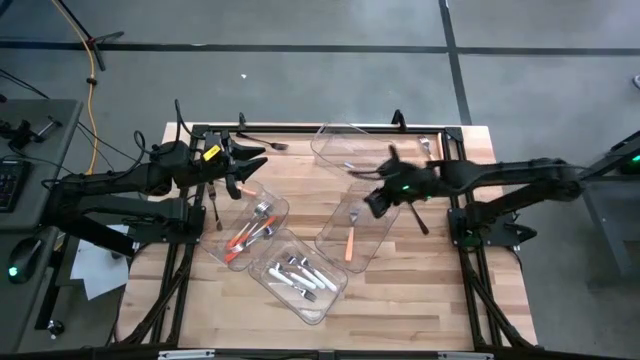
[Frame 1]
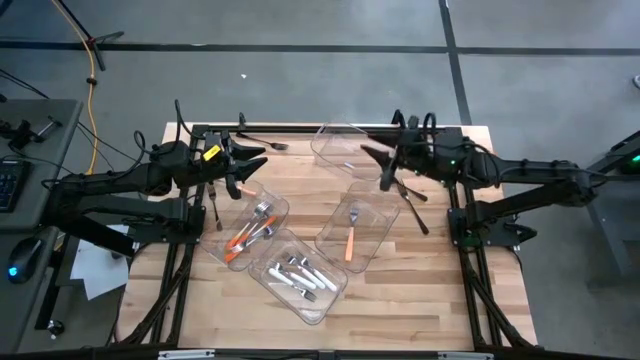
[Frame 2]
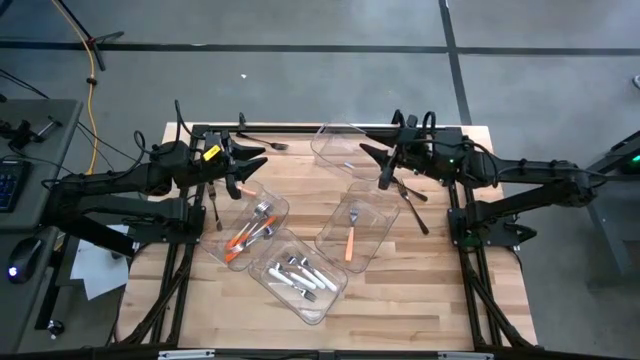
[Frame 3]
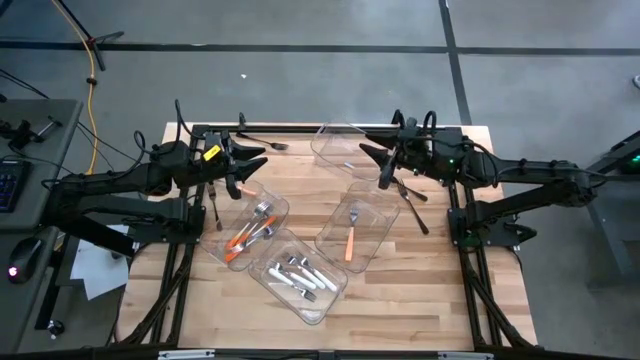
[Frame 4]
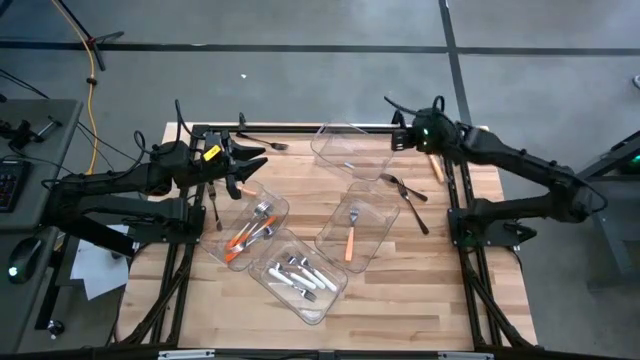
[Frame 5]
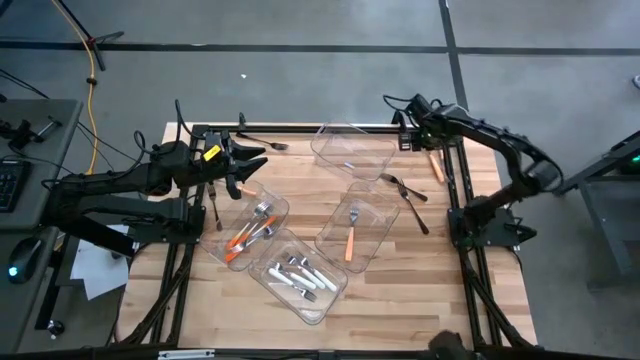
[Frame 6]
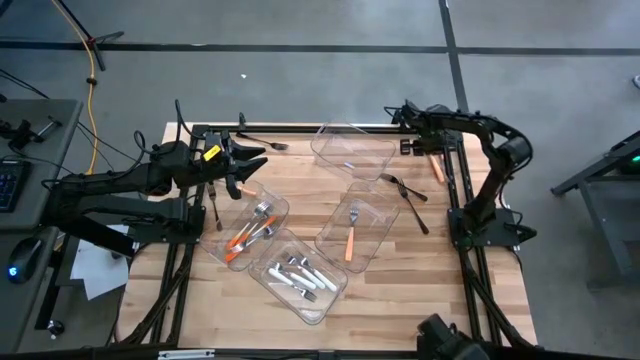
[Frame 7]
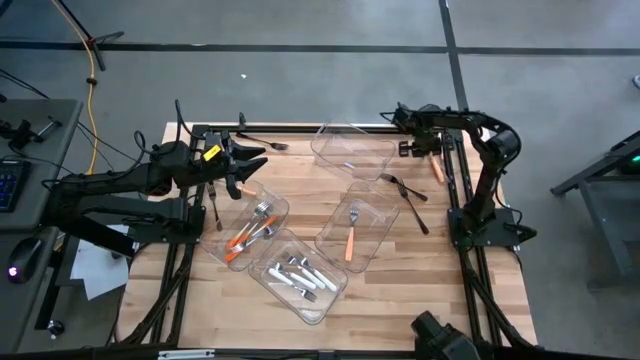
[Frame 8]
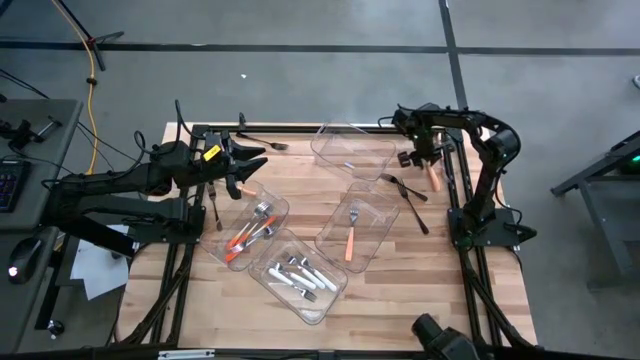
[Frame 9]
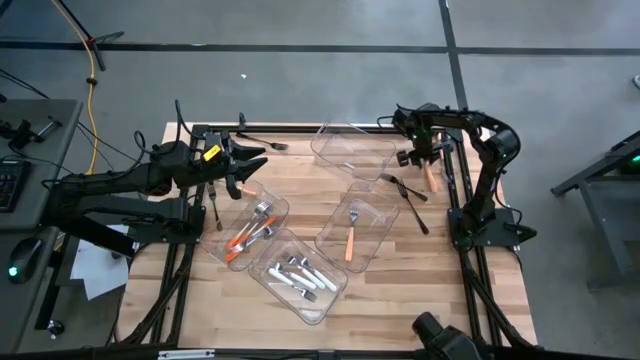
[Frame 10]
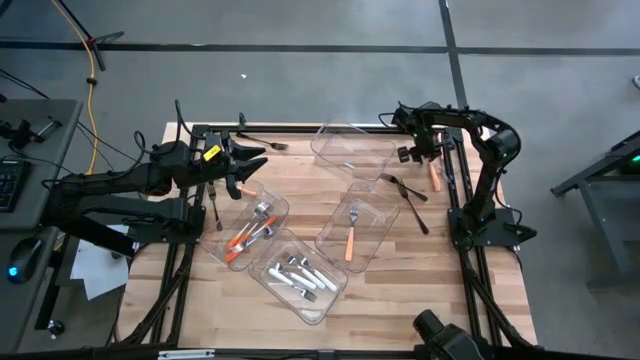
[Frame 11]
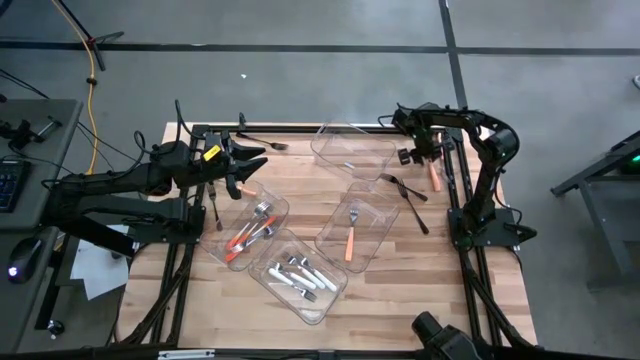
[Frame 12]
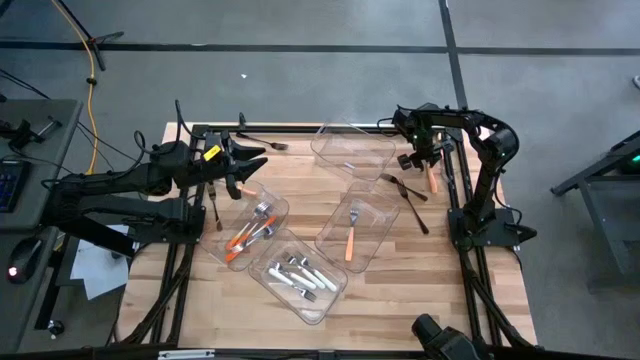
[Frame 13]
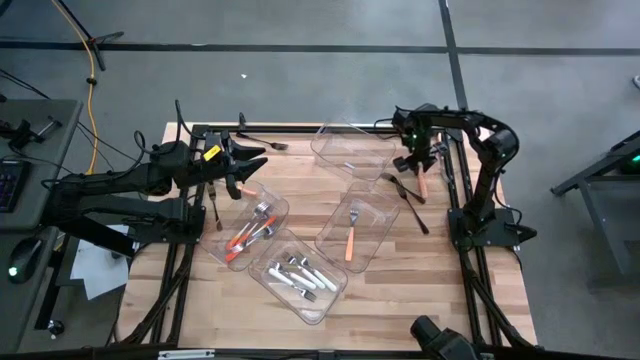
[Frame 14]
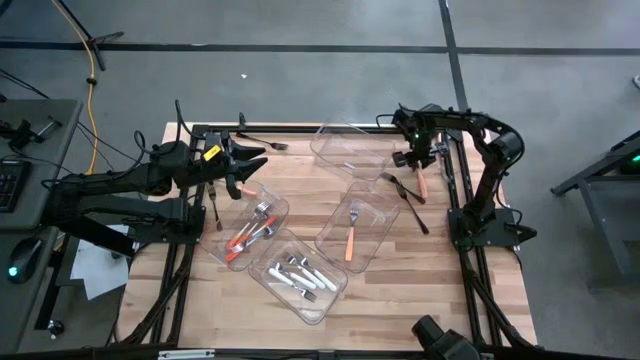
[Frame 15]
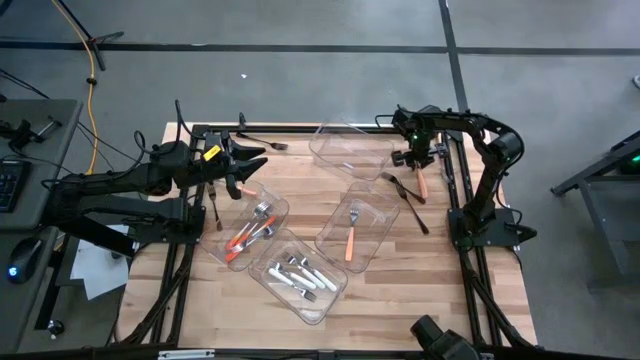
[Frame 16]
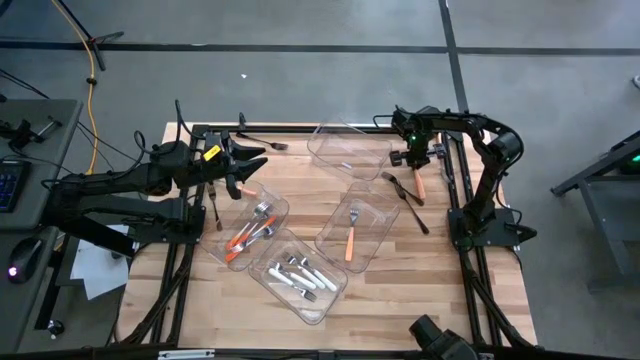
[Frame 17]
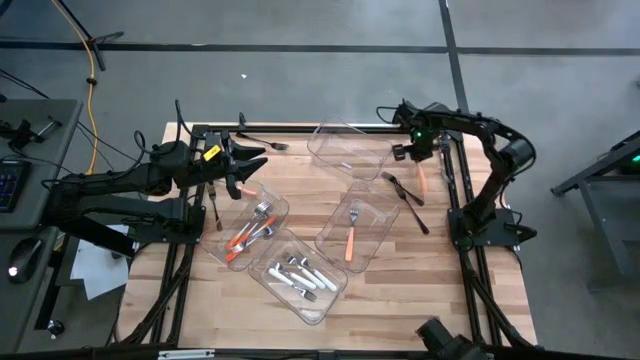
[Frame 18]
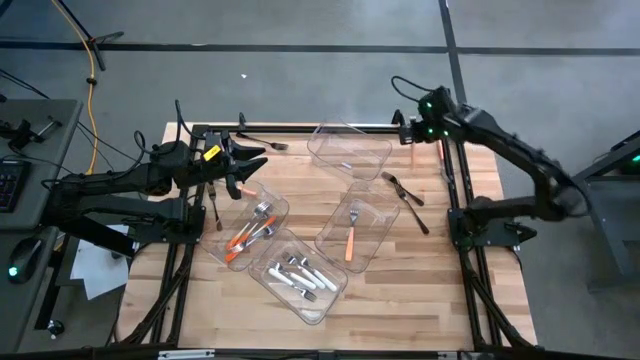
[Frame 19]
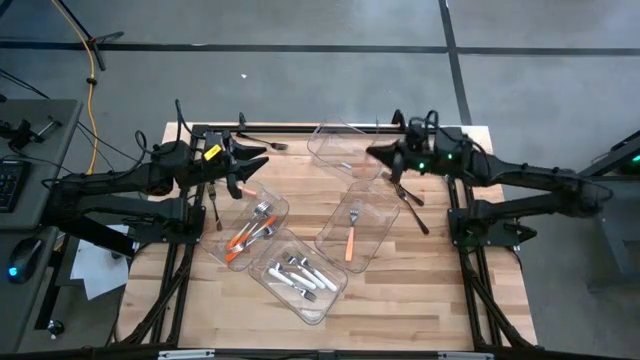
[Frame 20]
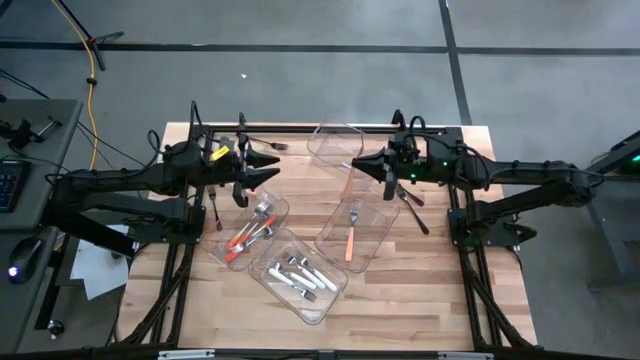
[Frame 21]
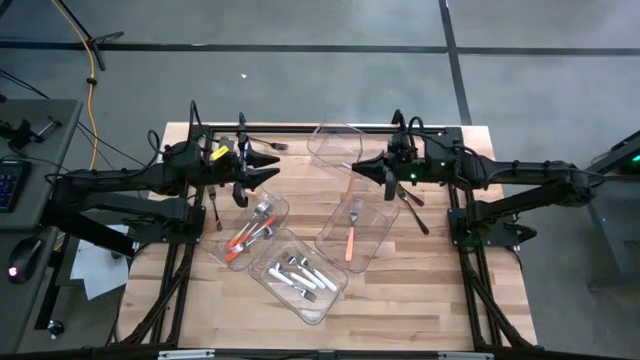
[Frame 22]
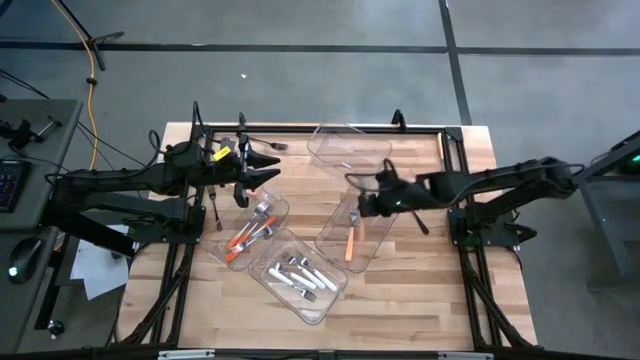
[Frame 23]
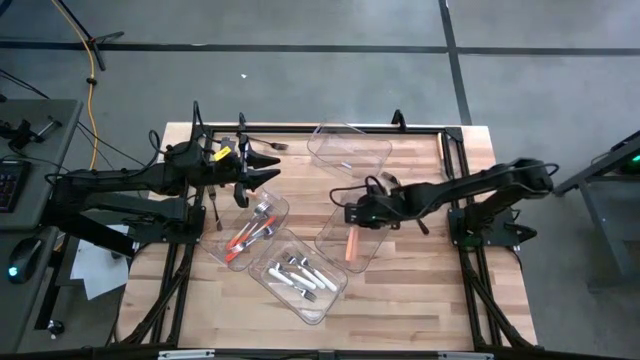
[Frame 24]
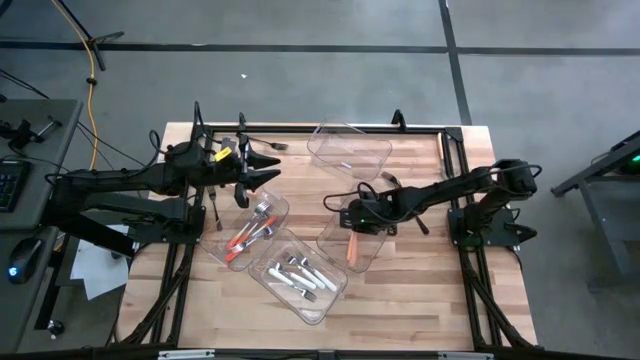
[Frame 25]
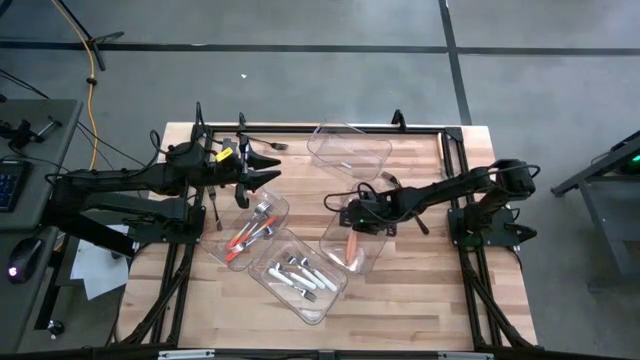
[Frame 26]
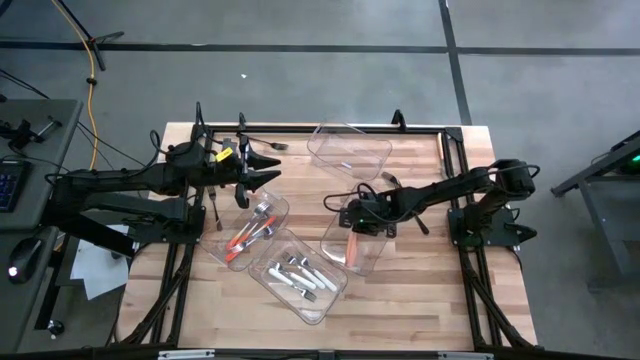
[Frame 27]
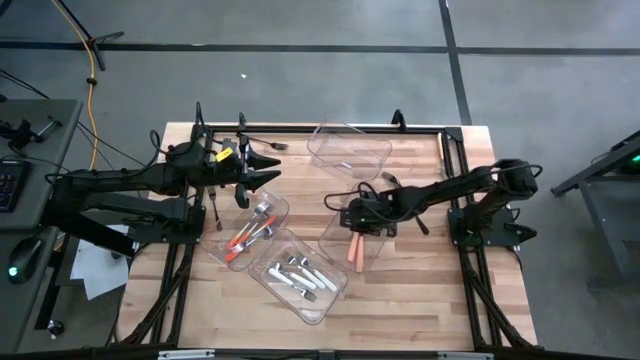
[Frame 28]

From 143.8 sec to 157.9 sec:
Task: Sort silverware by color (type)
Put the light orange fork into the middle right transparent bin

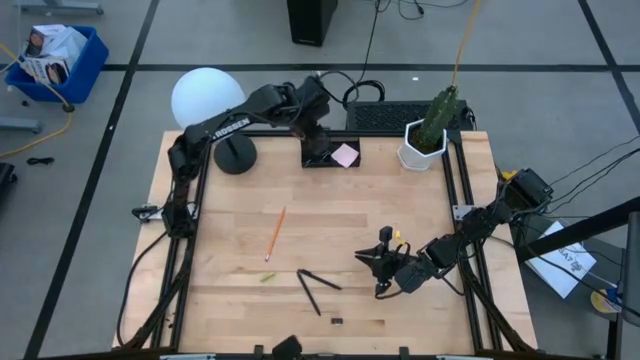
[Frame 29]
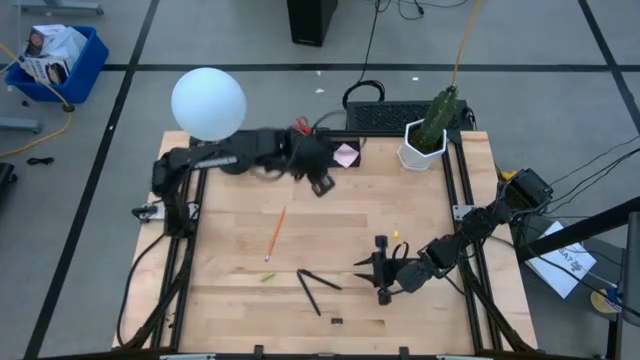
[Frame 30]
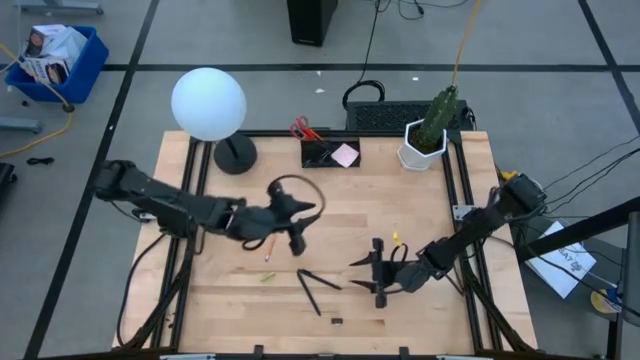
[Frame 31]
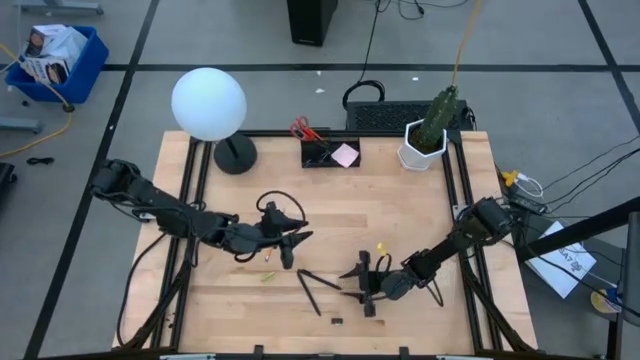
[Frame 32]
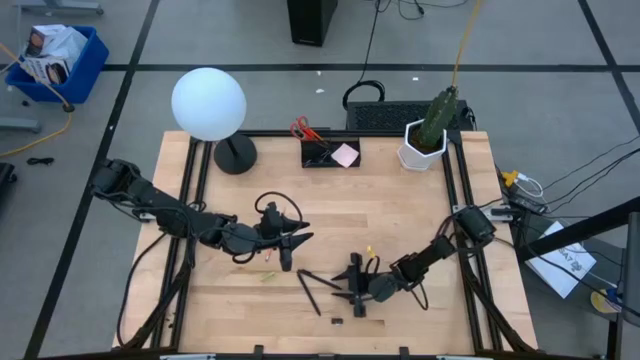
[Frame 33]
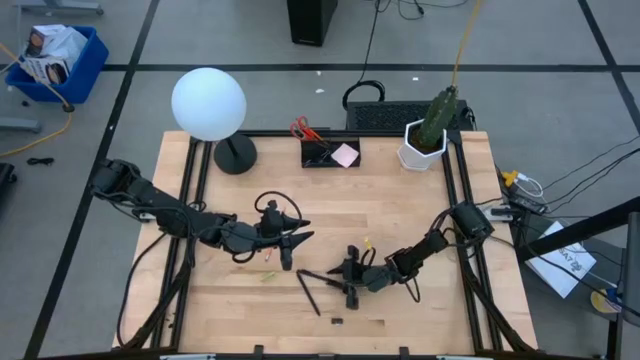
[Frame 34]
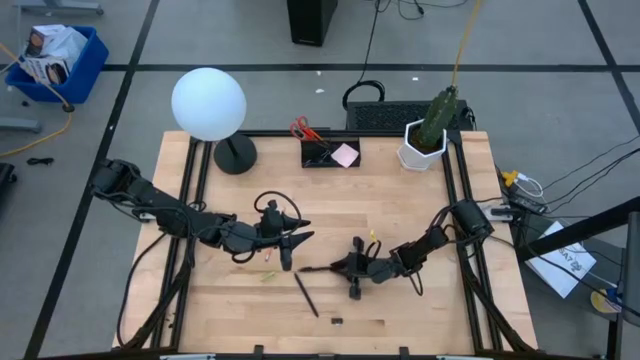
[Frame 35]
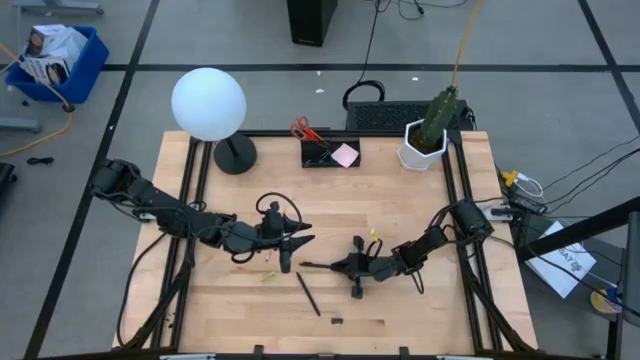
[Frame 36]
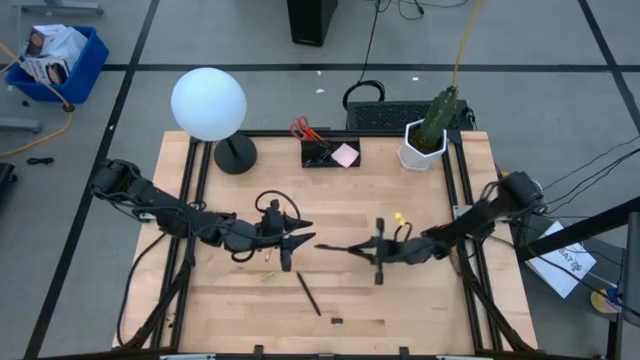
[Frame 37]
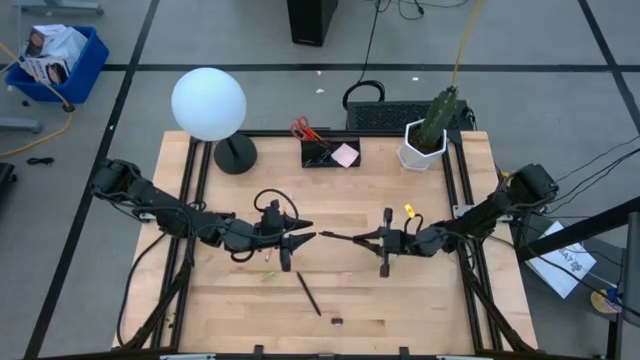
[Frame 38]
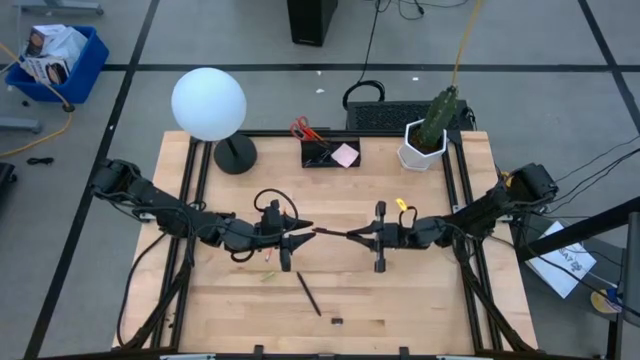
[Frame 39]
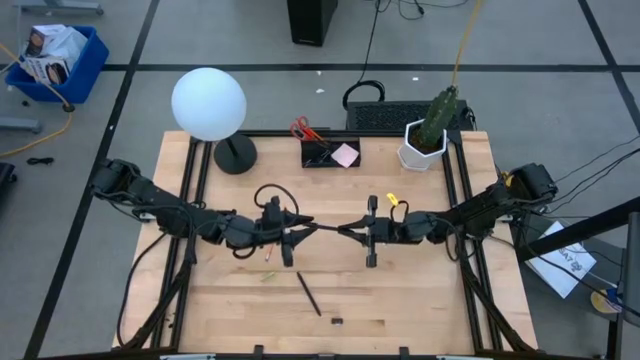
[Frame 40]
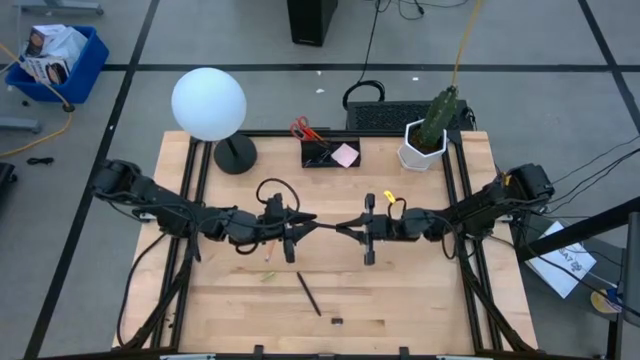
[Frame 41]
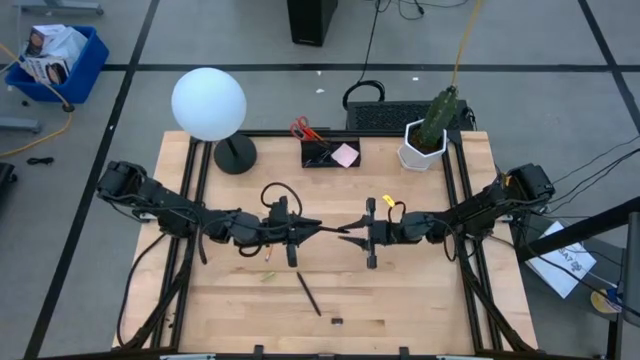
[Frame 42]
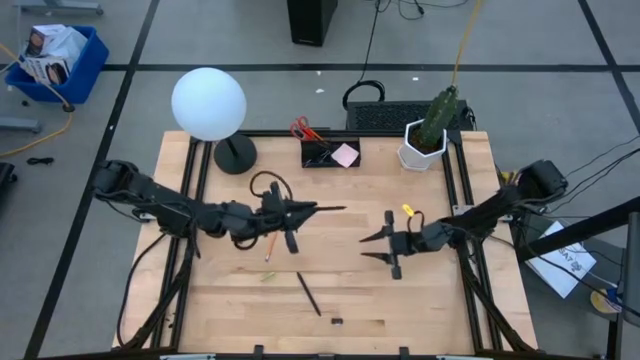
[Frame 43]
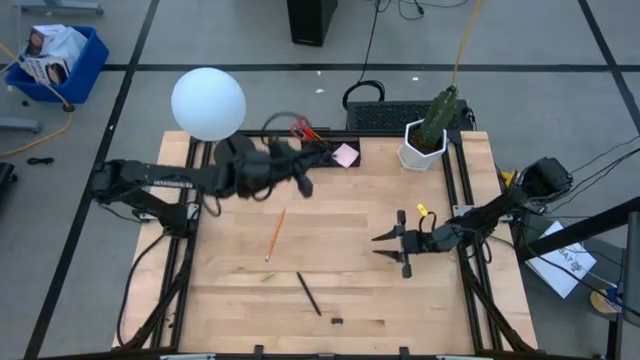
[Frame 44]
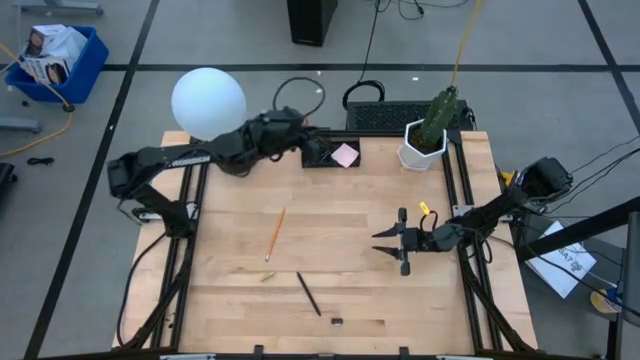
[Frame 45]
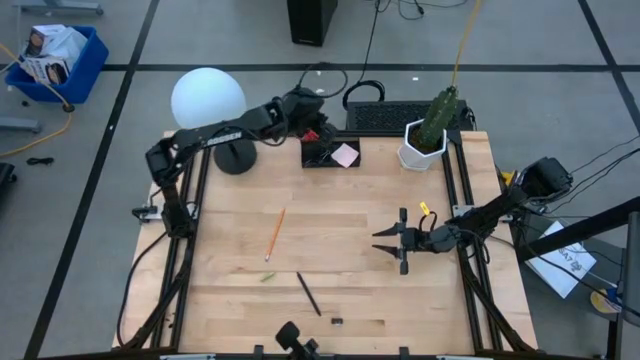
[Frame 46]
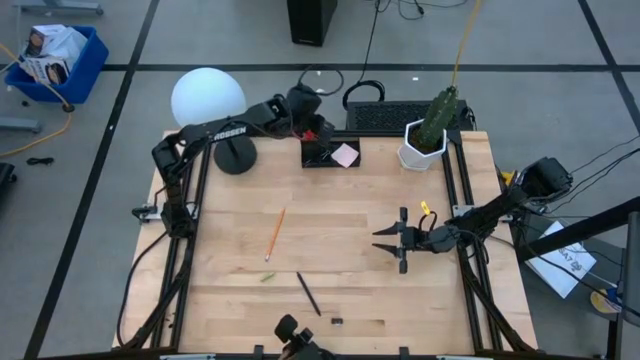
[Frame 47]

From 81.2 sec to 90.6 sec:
Task: Pick and place office supplies into organizer
Put the black pen into the desk organizer
